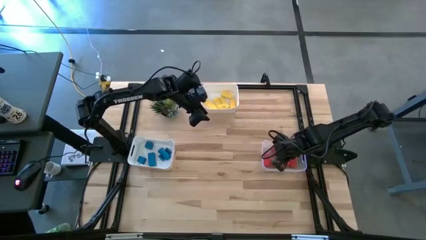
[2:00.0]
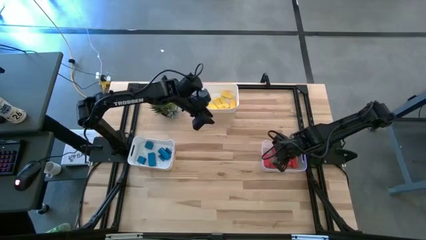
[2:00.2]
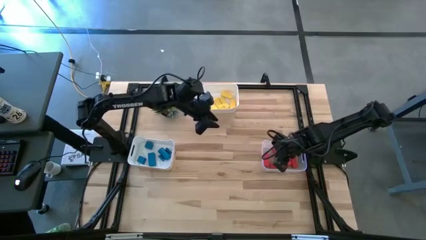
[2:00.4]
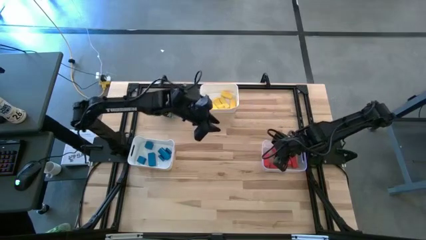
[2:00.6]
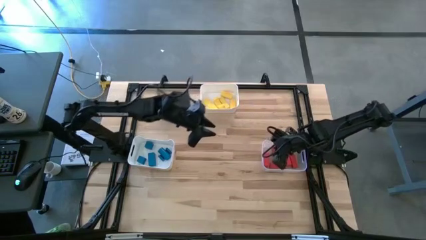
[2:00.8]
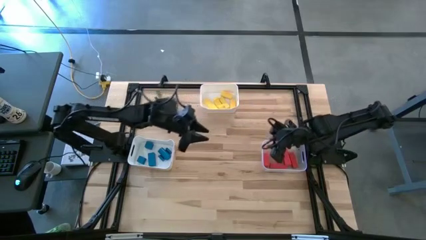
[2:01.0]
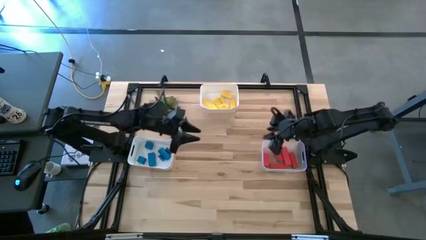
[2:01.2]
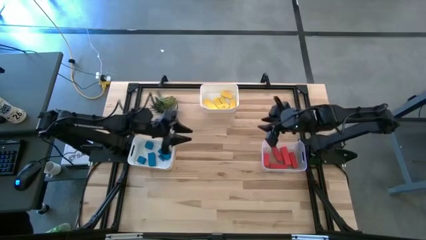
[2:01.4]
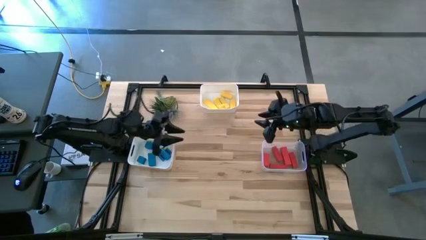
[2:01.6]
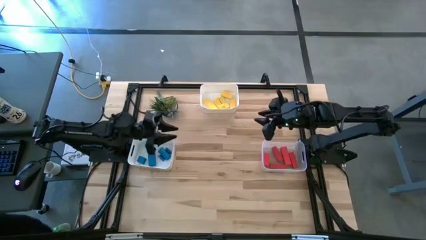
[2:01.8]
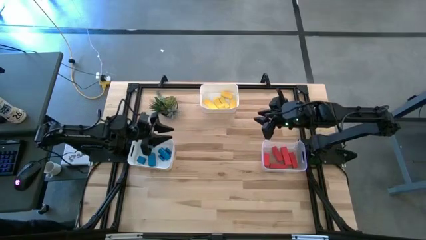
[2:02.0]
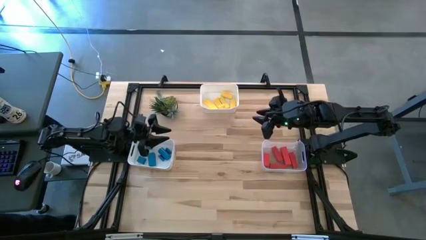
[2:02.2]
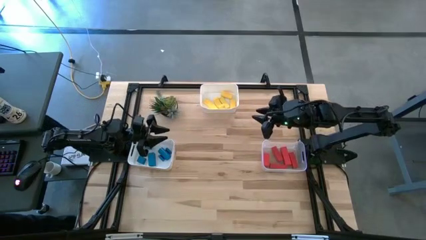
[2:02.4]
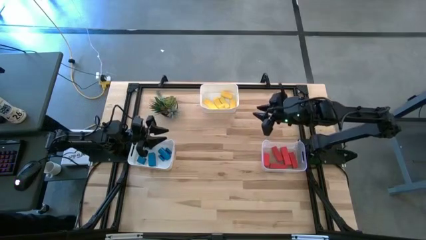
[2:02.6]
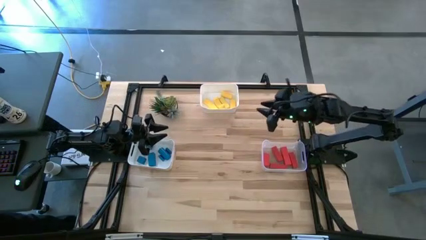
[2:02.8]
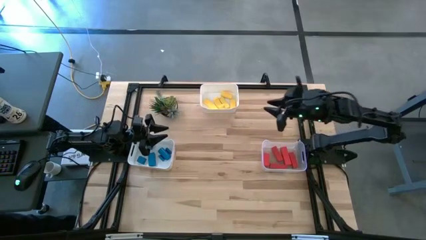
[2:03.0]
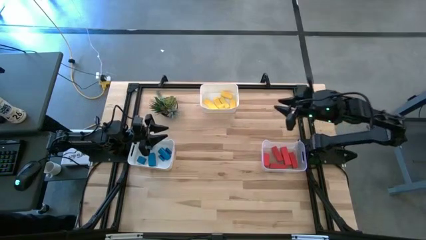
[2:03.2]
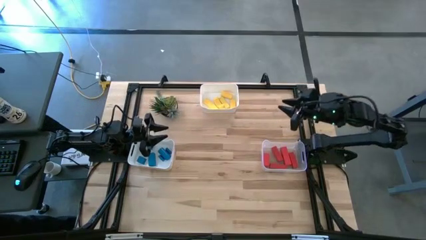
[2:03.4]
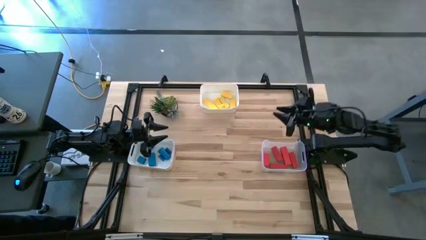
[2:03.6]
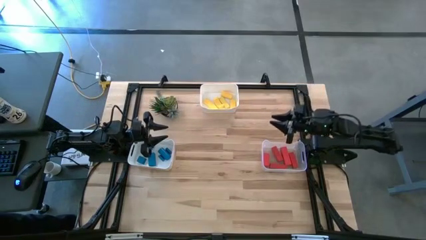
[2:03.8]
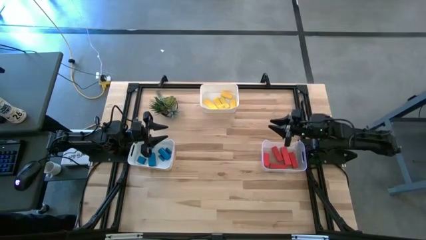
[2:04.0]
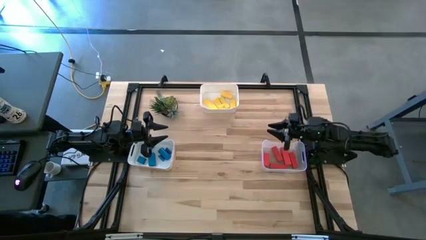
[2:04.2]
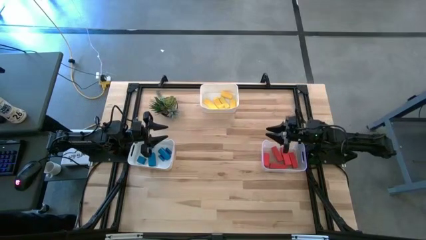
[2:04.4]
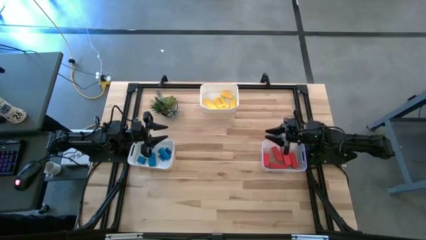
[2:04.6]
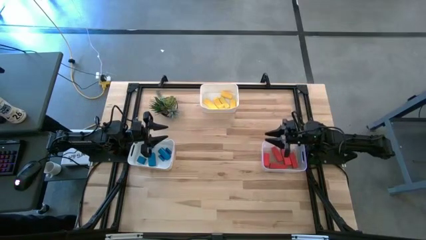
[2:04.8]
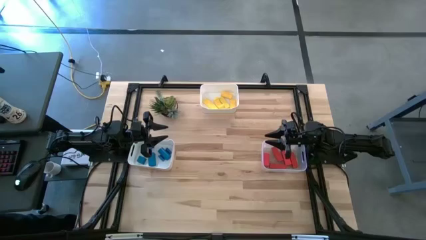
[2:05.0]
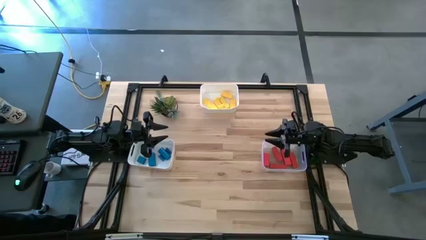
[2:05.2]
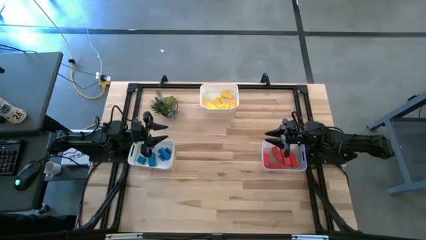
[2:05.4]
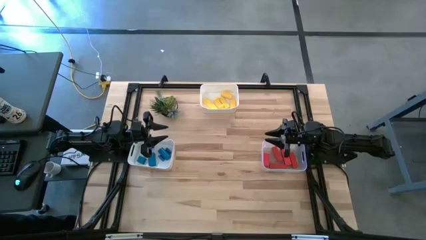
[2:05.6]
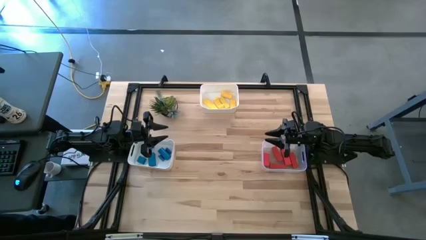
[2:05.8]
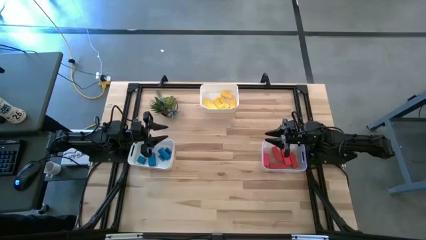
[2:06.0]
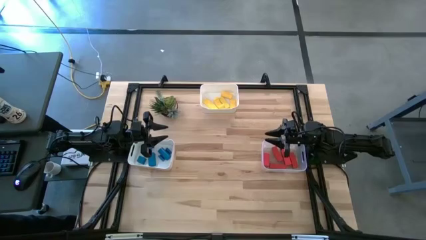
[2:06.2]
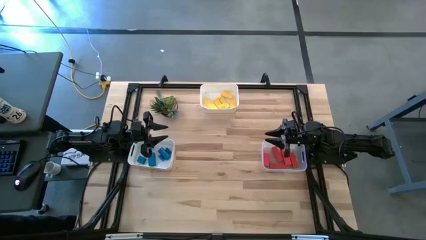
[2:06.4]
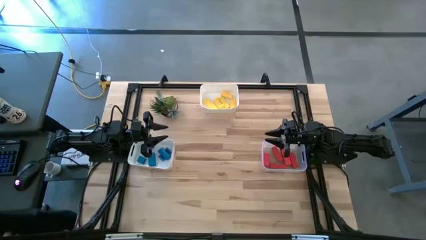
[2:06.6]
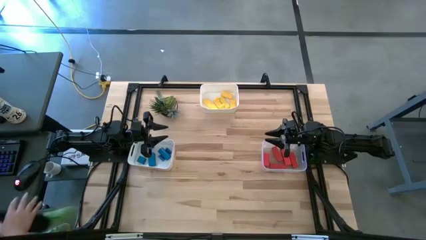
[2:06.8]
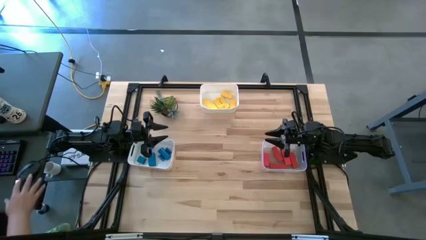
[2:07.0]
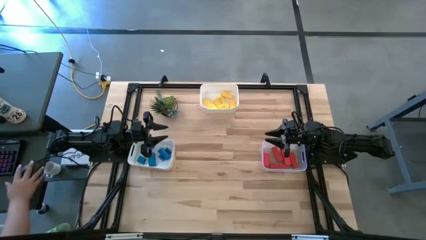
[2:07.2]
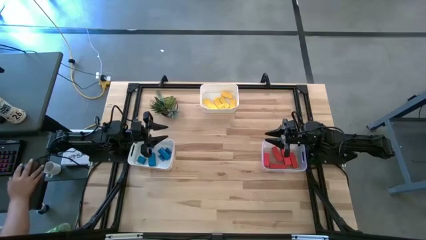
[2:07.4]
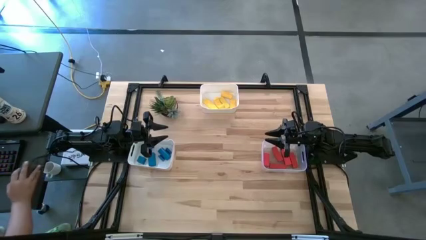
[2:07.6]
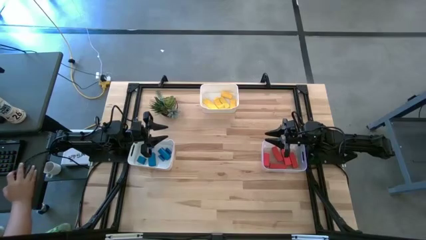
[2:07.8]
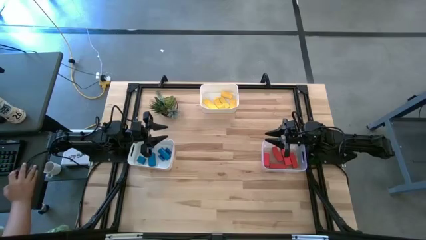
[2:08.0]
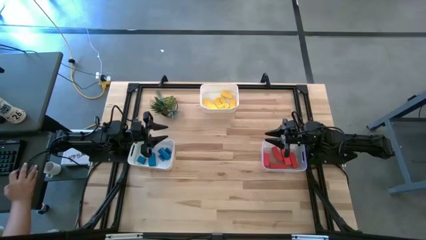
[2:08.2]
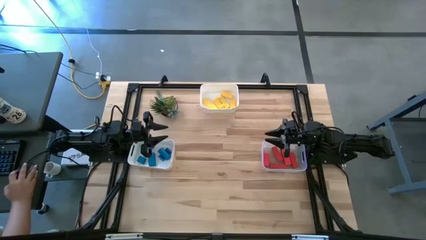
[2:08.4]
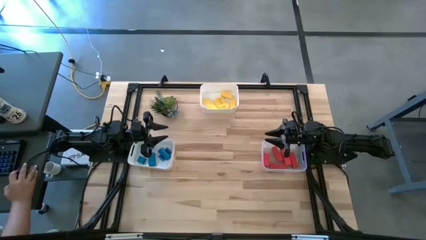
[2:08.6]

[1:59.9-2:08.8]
Task: Sort & place blocks by color
Return to Home Position

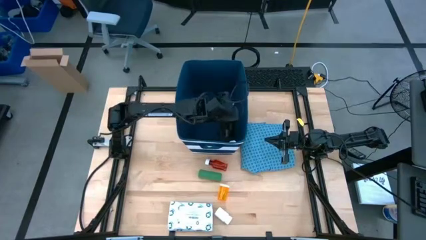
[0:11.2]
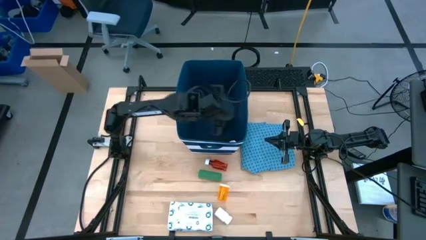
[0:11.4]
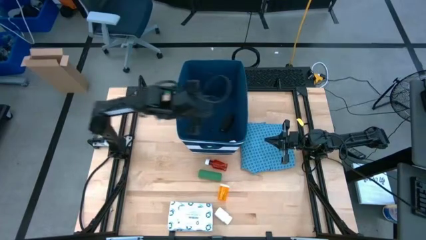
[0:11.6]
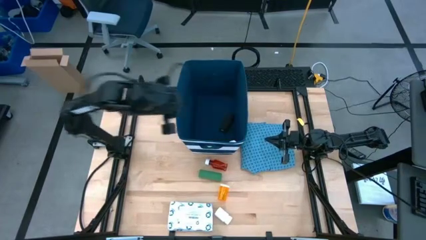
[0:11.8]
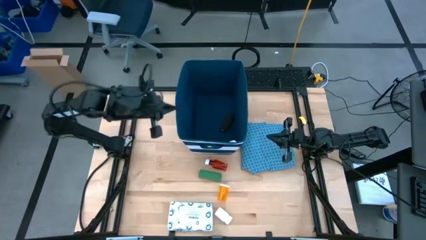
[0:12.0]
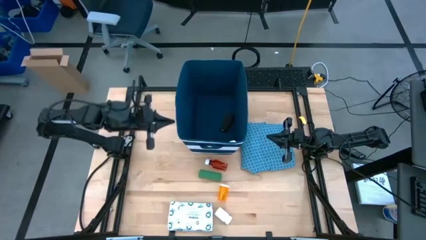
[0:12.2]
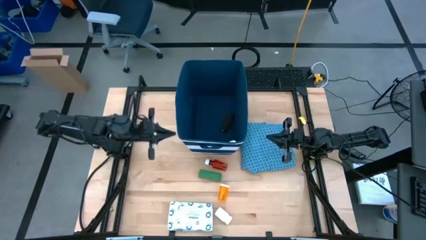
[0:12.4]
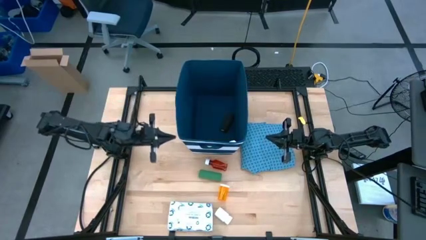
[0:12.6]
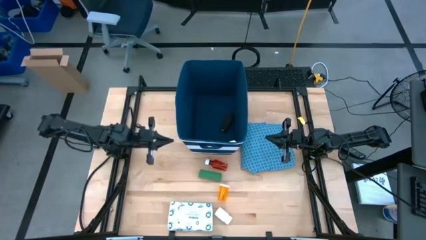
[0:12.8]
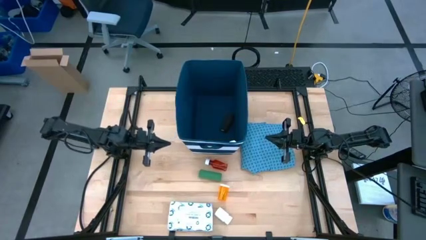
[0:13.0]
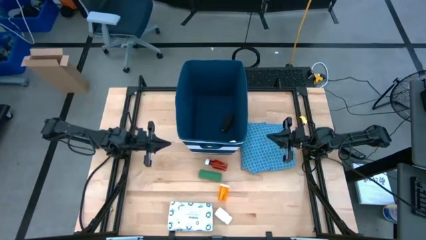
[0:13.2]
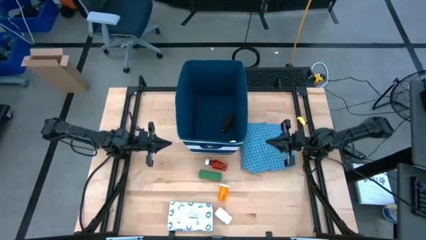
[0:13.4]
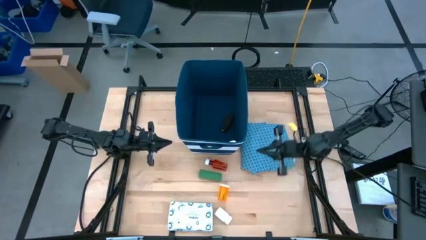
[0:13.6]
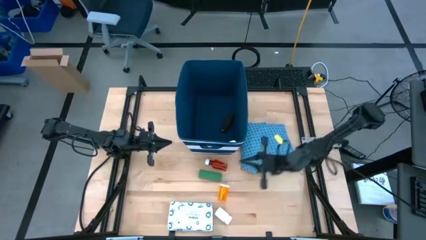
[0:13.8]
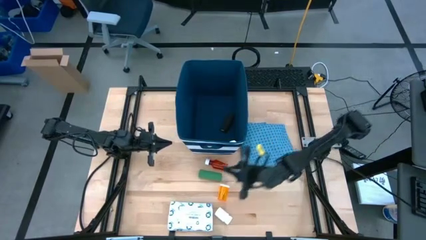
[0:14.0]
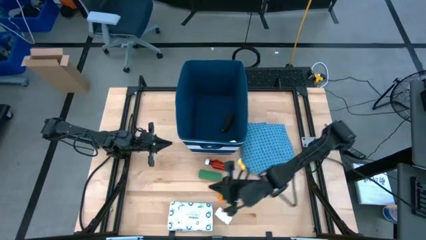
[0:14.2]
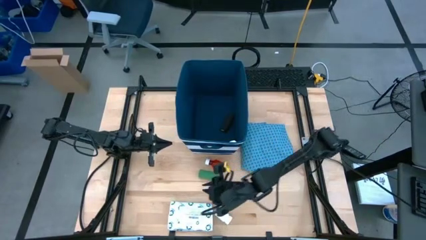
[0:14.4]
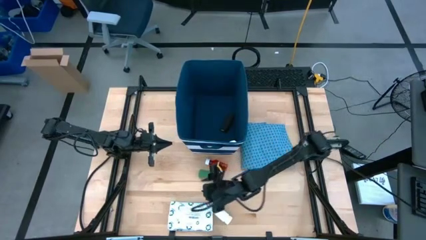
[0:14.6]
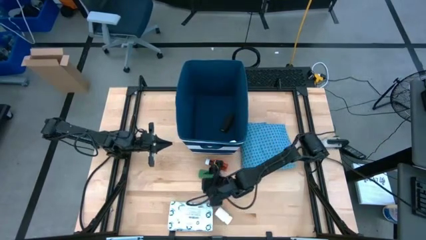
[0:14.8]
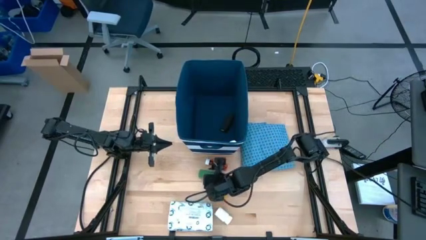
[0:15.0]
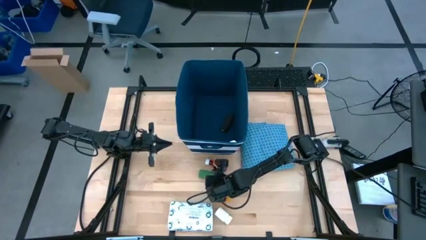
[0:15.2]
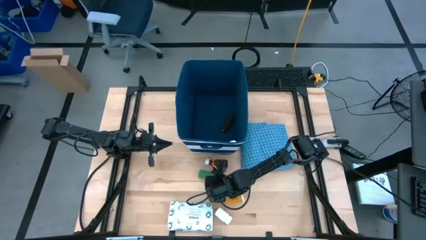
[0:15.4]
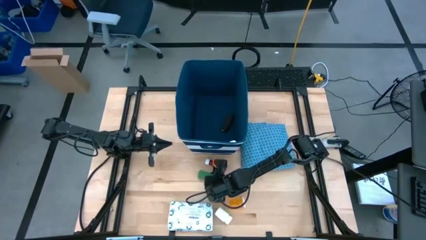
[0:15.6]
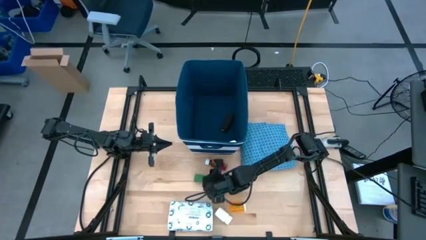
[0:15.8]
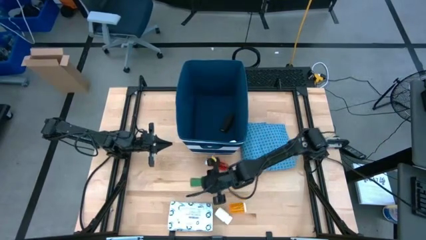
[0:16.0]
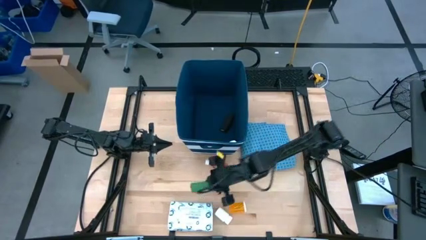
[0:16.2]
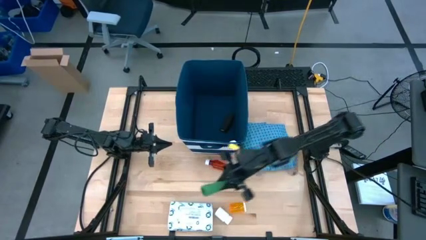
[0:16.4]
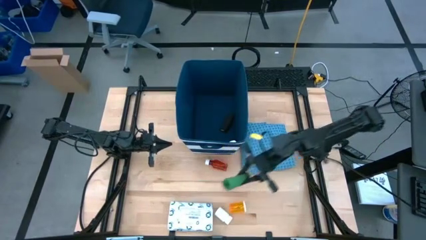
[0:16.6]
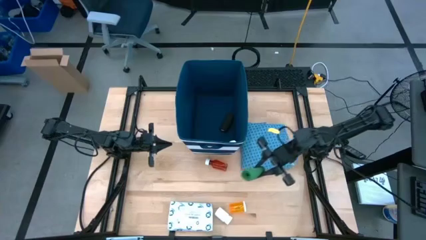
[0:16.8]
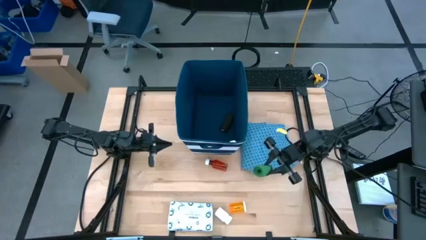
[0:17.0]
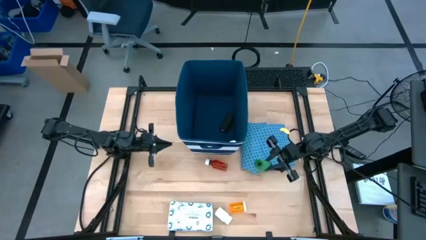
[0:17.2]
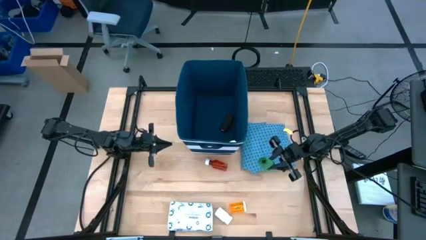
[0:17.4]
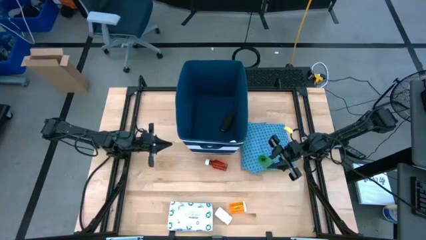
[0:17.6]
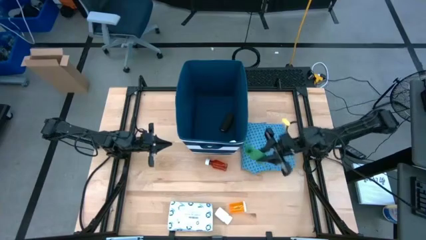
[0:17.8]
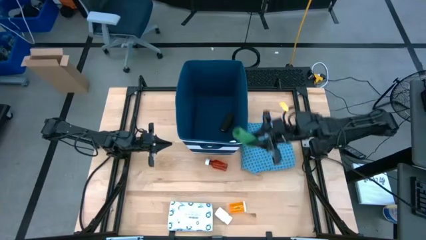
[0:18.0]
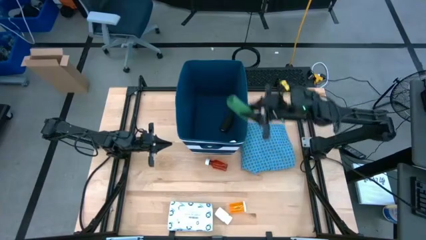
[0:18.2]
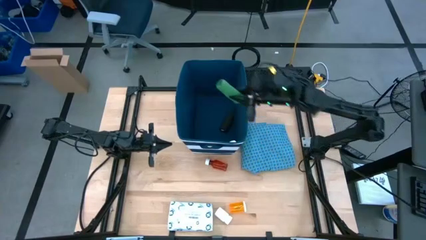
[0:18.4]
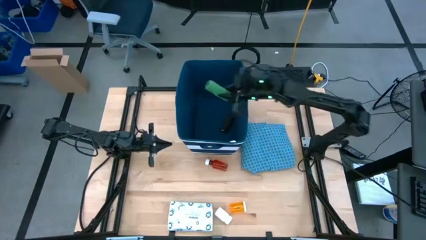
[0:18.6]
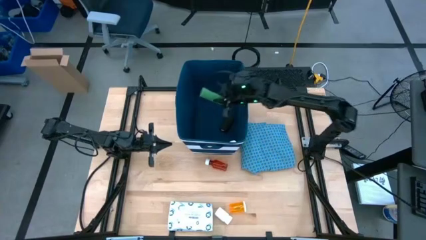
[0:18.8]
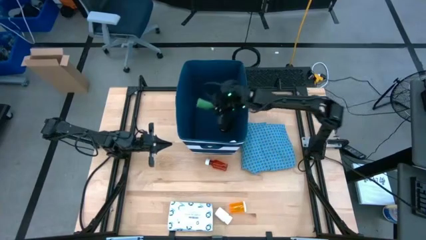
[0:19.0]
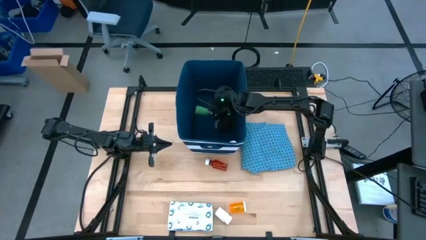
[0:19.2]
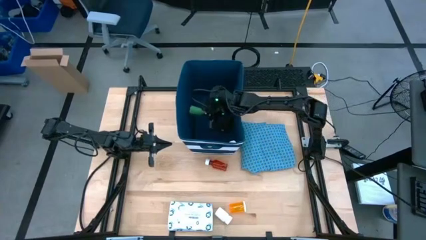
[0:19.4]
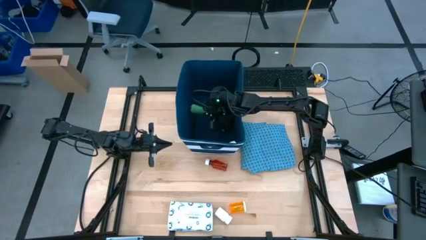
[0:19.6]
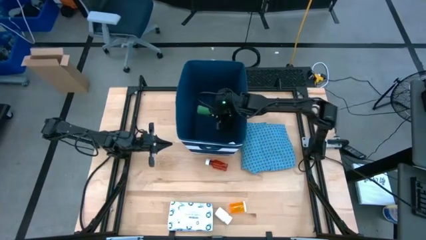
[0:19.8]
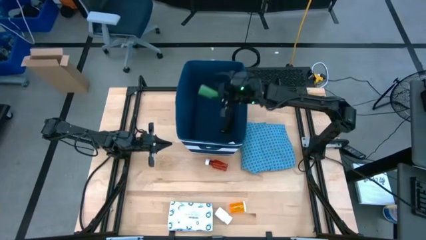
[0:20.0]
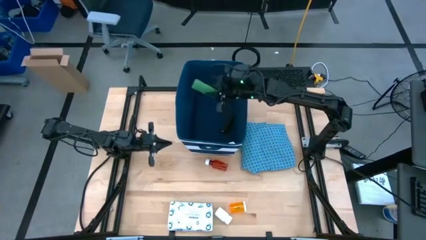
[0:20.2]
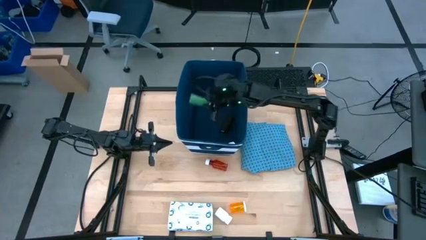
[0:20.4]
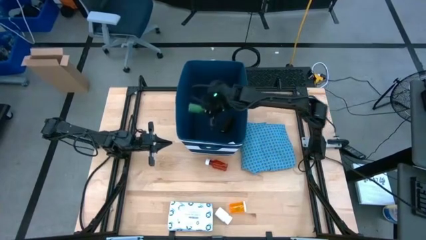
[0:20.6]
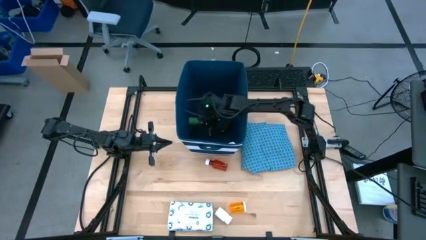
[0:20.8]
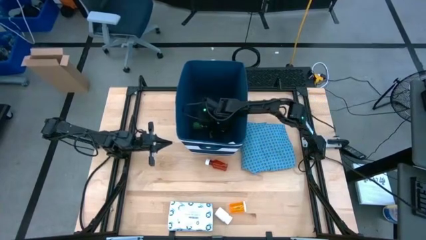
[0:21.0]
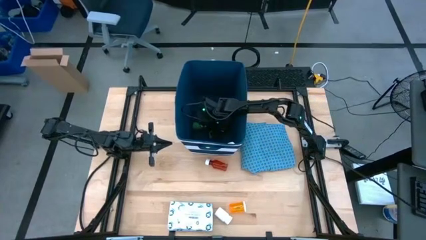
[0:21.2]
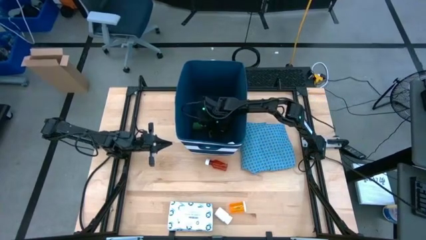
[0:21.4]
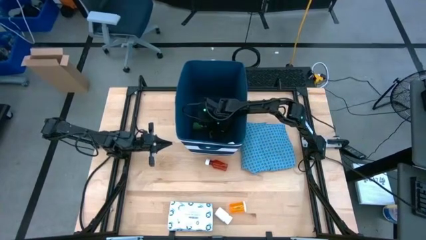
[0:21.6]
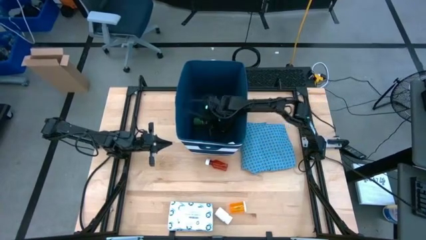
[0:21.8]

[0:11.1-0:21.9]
Task: Pick & place medical supplies in basket/bin
Put the green bandage into the blue bin
